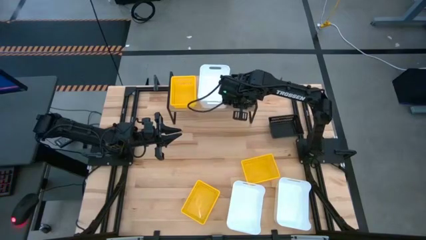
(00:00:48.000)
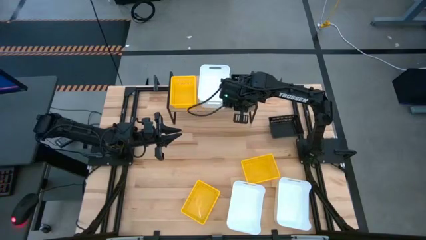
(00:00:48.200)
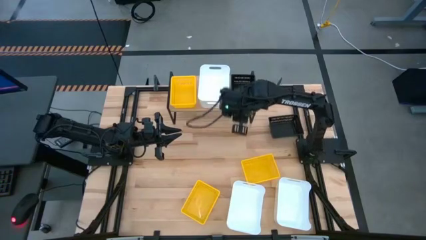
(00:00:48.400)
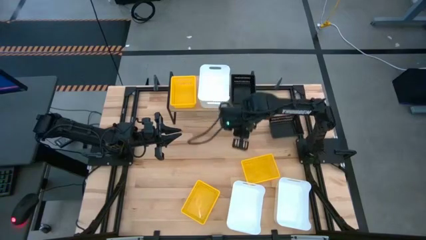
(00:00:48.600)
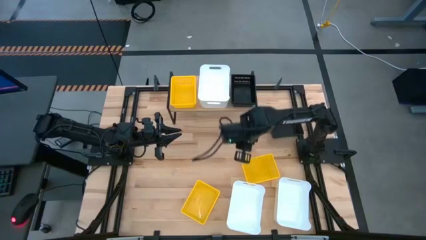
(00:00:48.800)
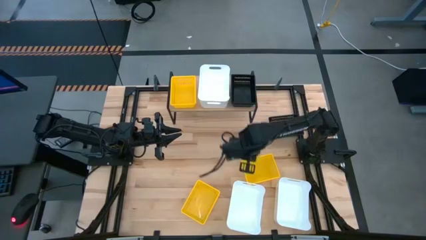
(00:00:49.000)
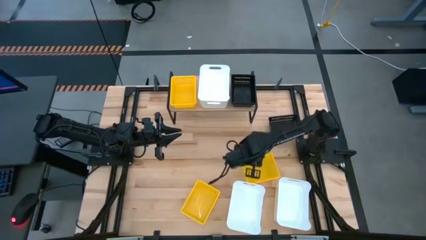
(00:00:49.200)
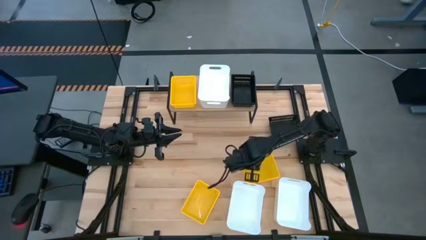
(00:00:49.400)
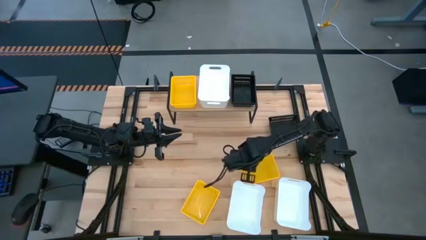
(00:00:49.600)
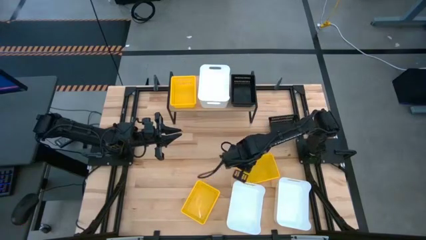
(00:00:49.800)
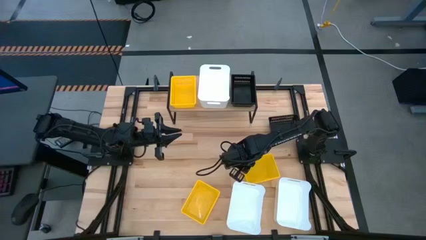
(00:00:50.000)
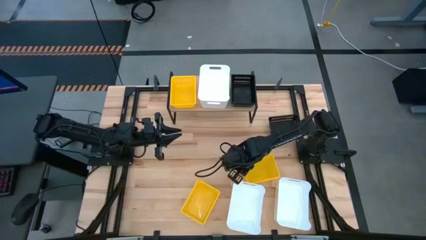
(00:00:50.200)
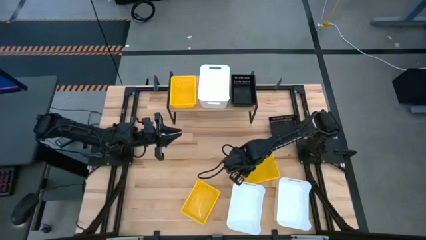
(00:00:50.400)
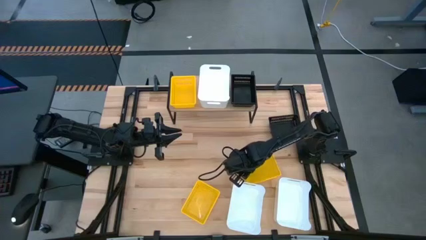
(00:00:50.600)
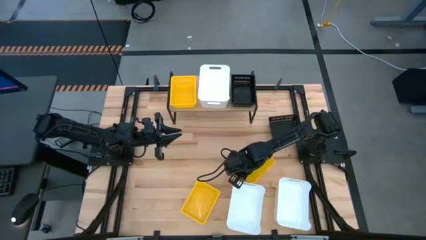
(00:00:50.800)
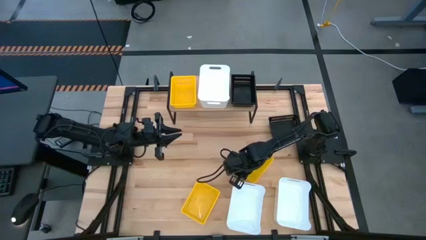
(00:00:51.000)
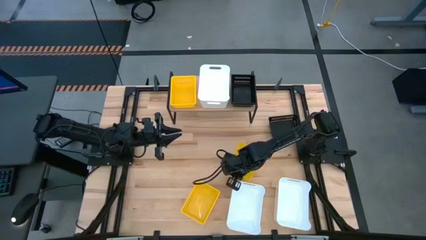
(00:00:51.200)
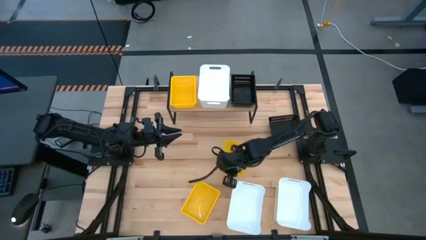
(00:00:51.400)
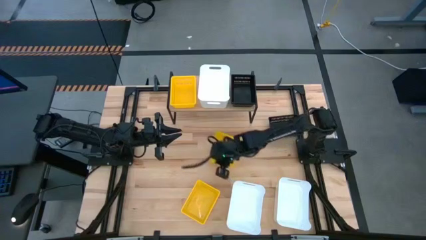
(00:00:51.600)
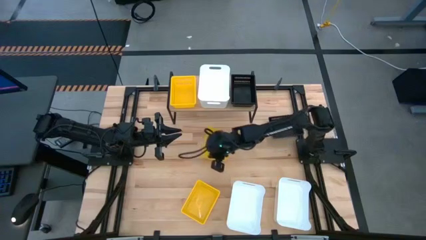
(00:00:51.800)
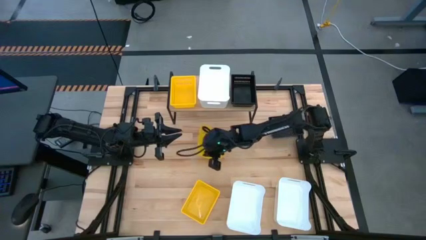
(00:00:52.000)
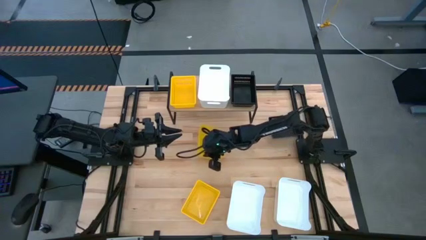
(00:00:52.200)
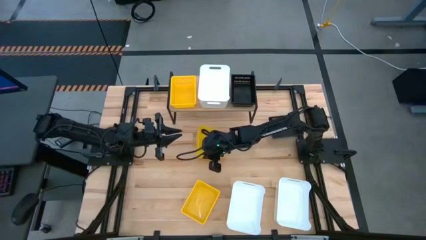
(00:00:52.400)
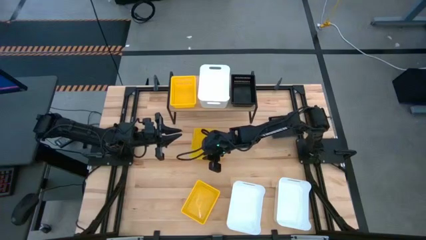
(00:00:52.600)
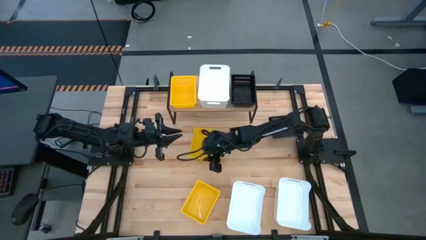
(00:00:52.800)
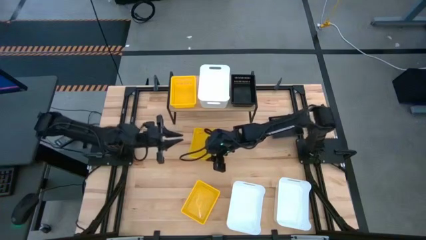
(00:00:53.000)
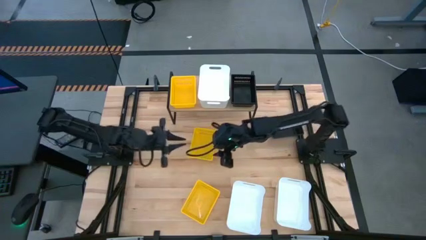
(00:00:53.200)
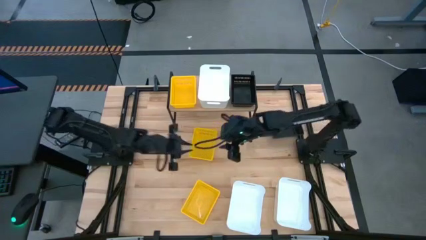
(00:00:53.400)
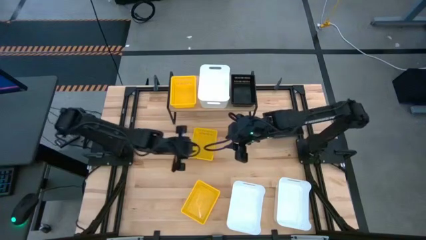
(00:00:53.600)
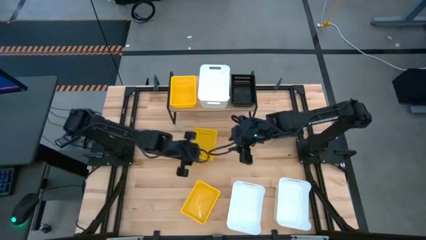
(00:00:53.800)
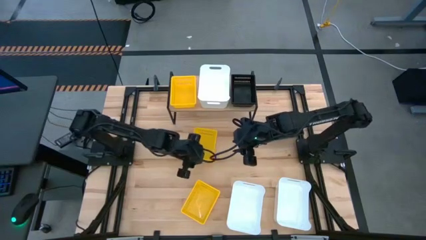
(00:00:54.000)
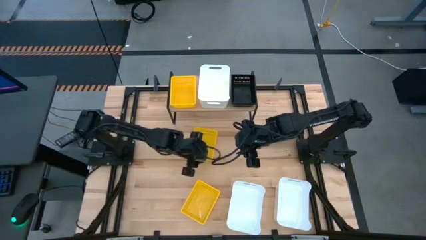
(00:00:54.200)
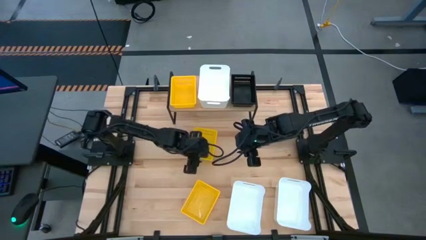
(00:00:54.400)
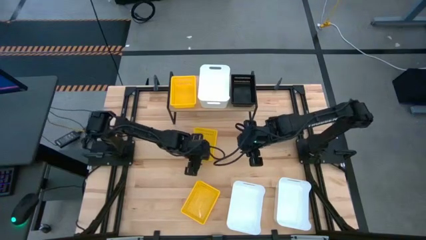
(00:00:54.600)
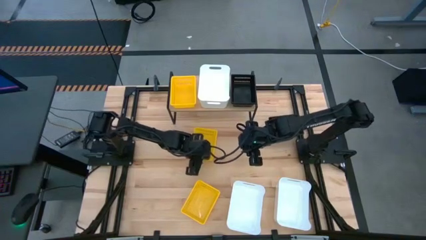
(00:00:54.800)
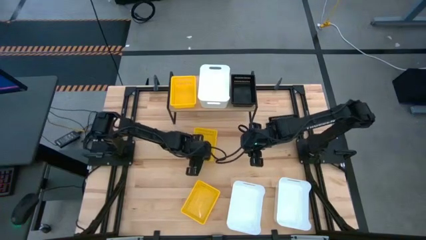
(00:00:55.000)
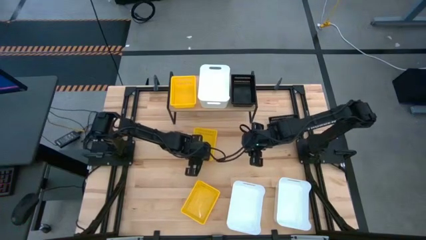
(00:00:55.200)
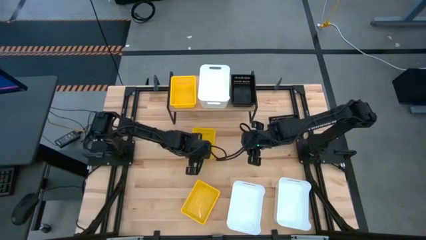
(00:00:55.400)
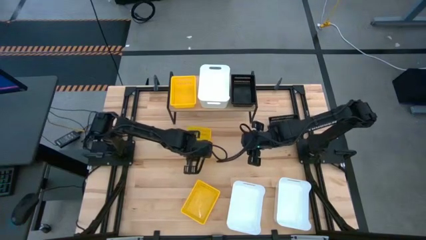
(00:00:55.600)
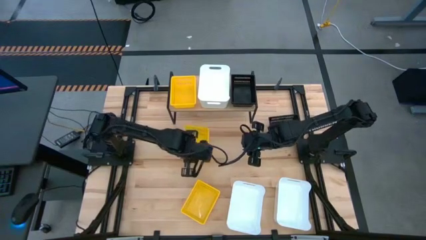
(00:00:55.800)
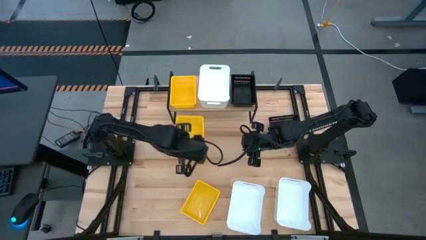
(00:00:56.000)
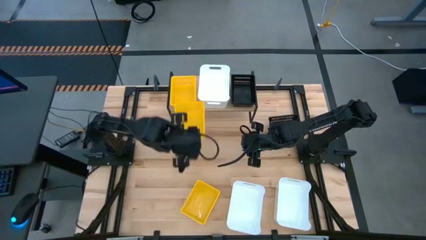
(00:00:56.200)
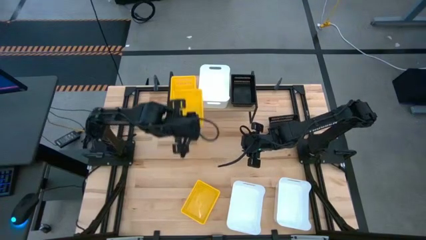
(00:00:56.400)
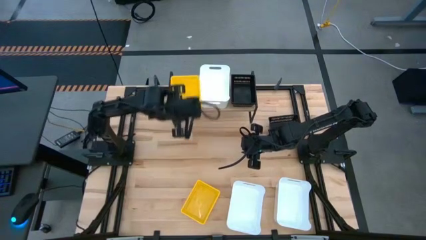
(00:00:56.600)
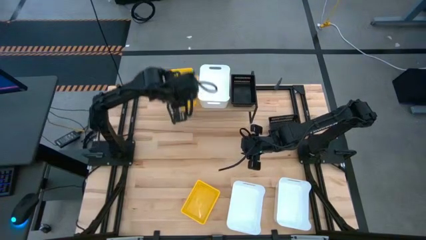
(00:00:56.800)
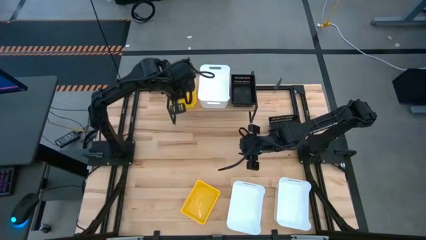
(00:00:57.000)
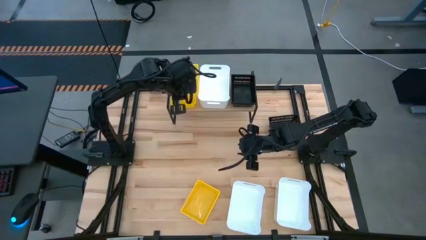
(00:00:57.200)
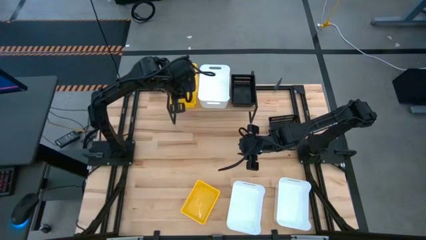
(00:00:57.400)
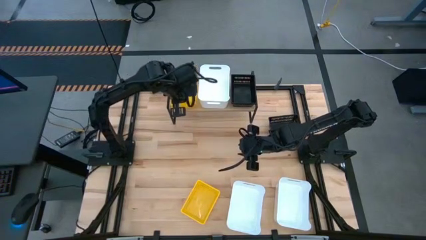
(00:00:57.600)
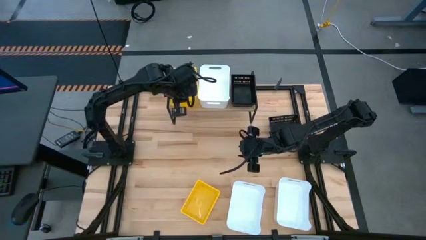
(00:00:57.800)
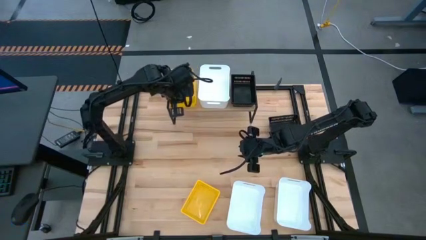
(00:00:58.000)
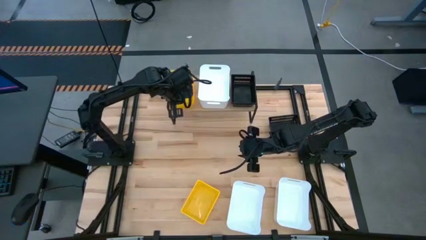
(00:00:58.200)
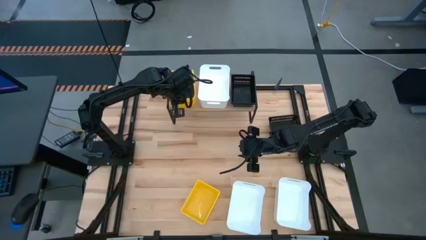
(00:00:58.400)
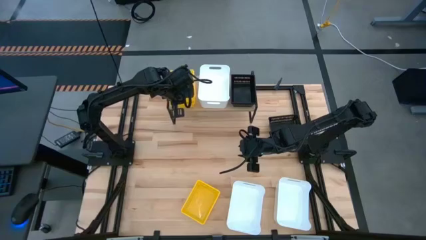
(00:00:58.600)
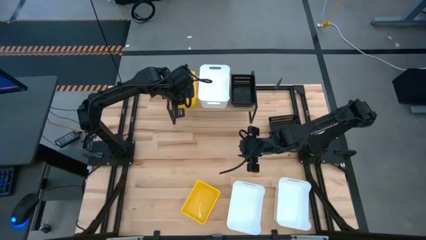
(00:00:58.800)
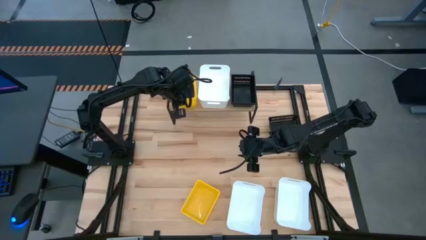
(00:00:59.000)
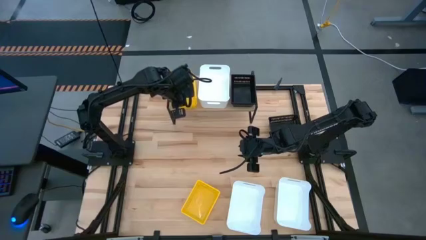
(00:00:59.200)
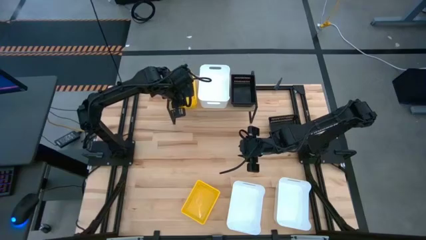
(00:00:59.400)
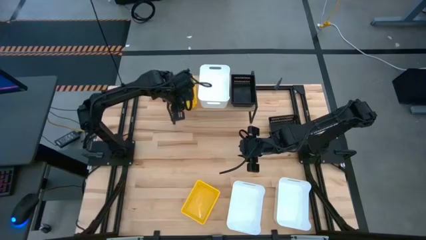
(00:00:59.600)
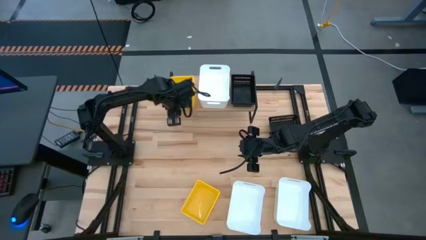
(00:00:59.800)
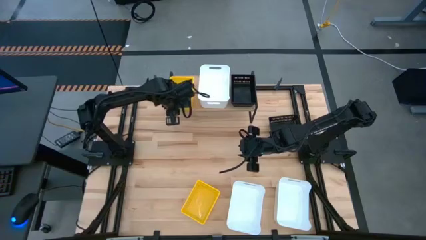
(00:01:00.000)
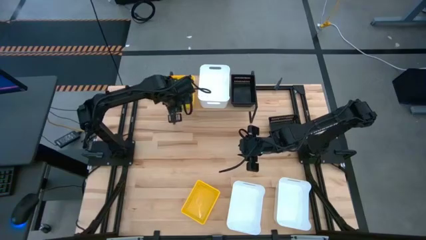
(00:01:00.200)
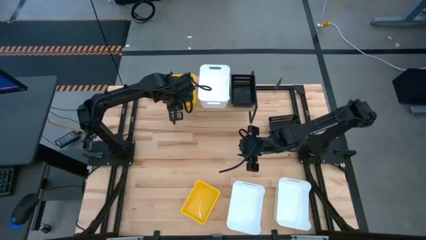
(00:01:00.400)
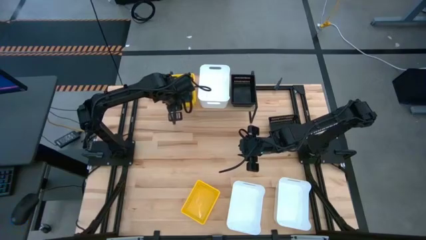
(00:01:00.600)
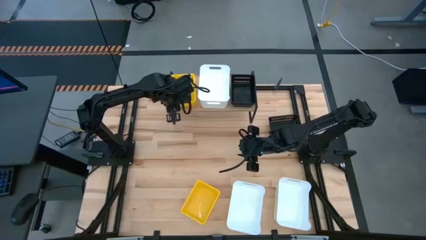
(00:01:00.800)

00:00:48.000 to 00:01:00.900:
Task: Stack baskets on shelf by color
Stack the top yellow basket on the yellow basket on the shelf
